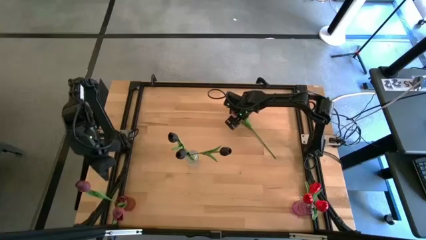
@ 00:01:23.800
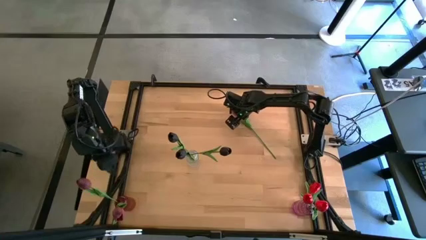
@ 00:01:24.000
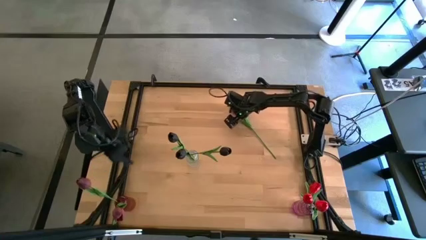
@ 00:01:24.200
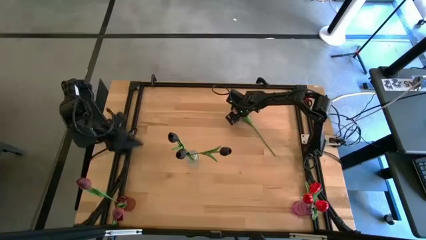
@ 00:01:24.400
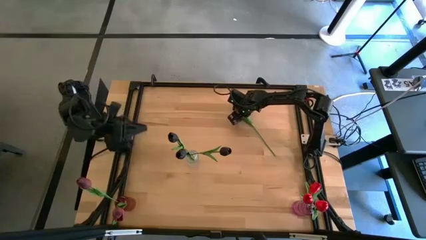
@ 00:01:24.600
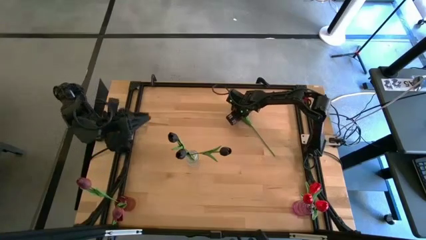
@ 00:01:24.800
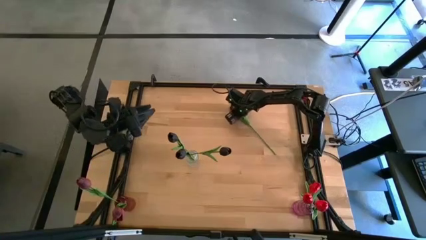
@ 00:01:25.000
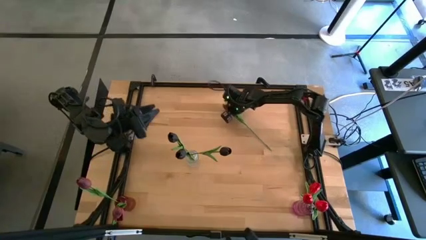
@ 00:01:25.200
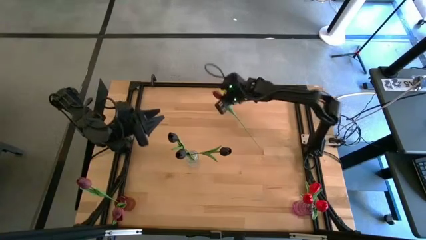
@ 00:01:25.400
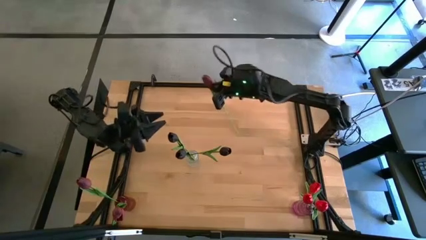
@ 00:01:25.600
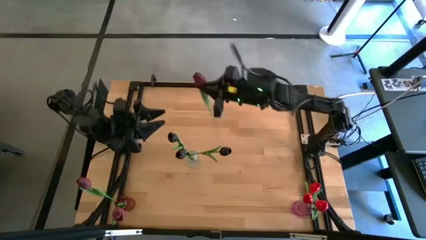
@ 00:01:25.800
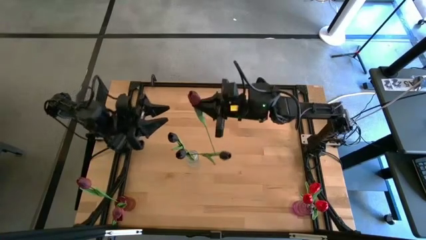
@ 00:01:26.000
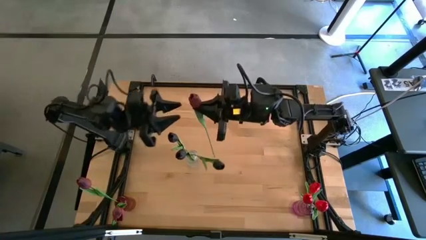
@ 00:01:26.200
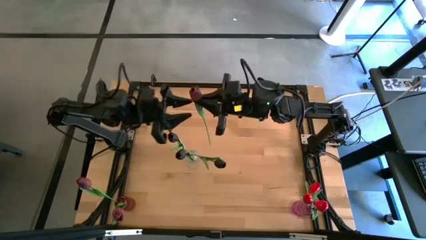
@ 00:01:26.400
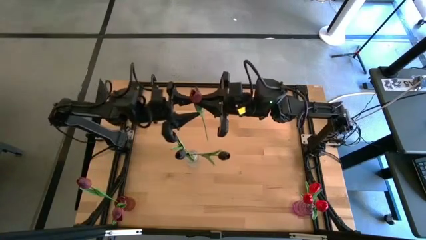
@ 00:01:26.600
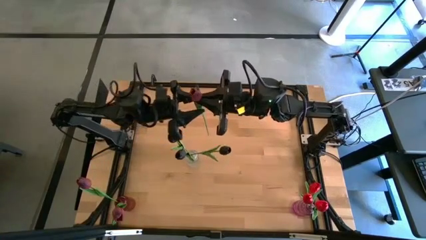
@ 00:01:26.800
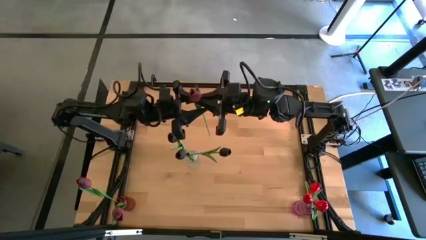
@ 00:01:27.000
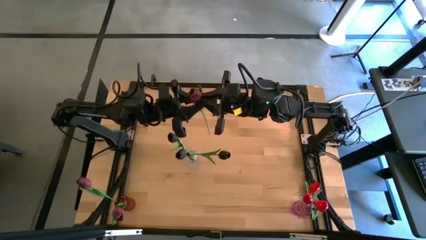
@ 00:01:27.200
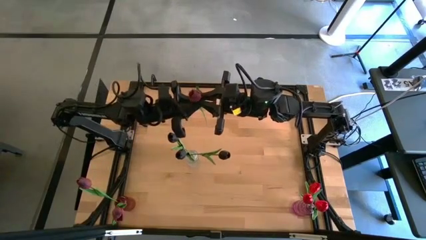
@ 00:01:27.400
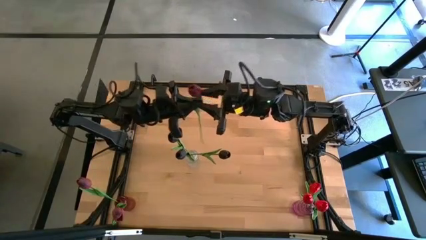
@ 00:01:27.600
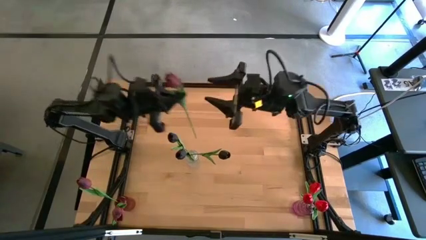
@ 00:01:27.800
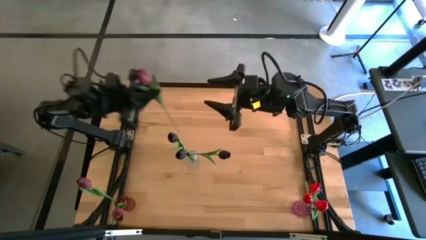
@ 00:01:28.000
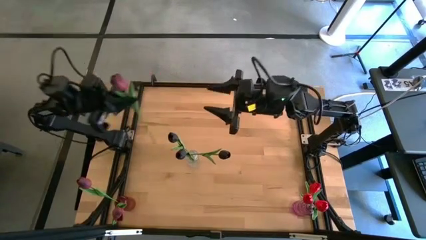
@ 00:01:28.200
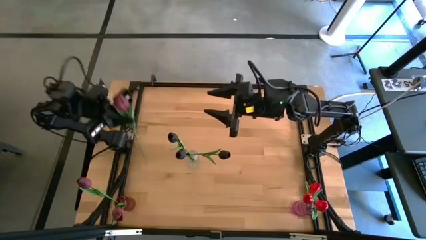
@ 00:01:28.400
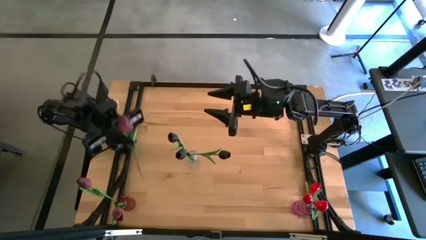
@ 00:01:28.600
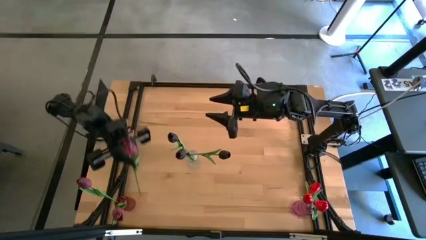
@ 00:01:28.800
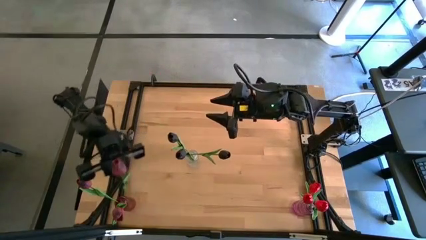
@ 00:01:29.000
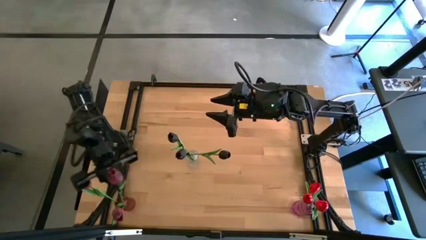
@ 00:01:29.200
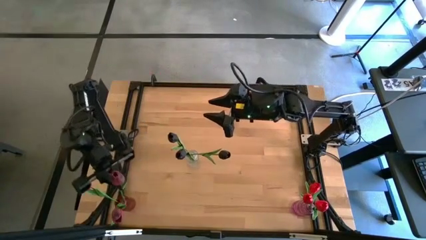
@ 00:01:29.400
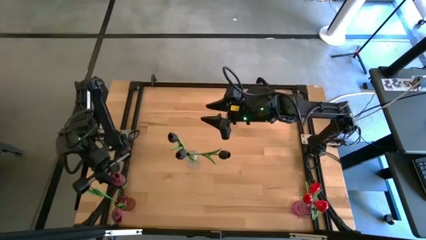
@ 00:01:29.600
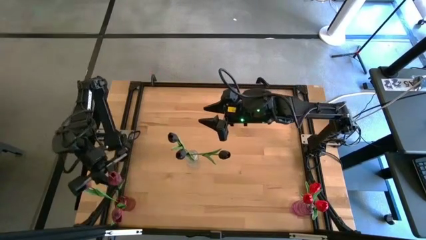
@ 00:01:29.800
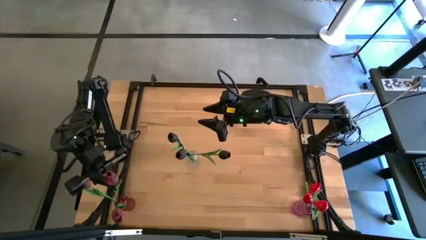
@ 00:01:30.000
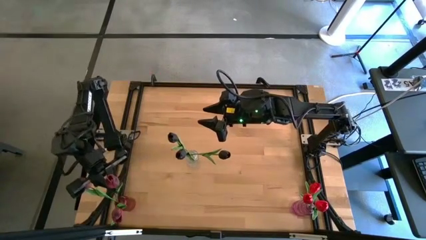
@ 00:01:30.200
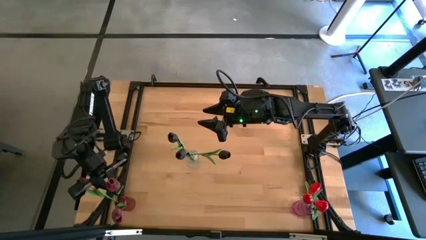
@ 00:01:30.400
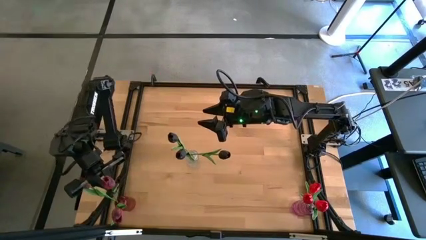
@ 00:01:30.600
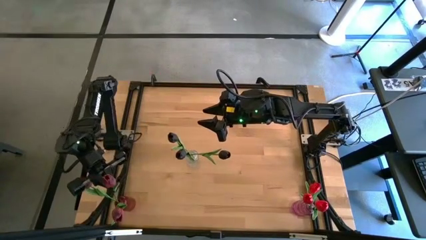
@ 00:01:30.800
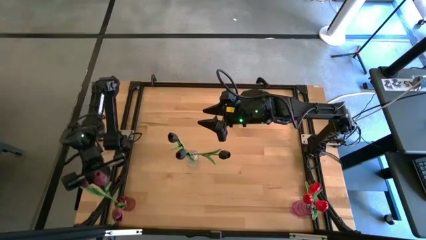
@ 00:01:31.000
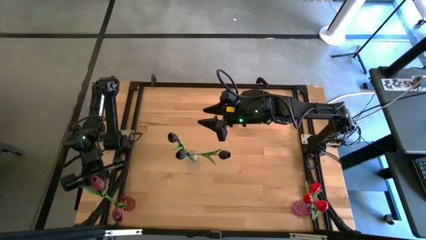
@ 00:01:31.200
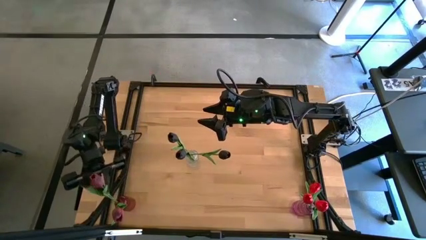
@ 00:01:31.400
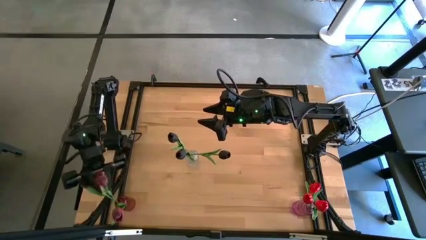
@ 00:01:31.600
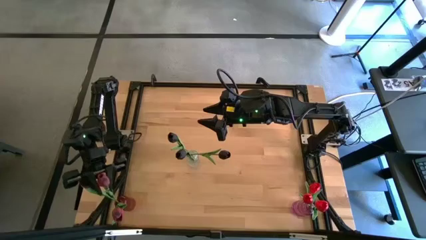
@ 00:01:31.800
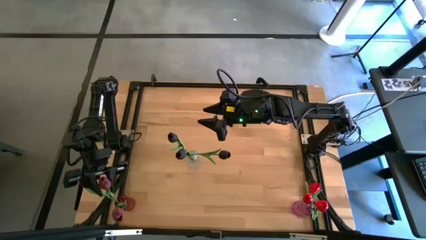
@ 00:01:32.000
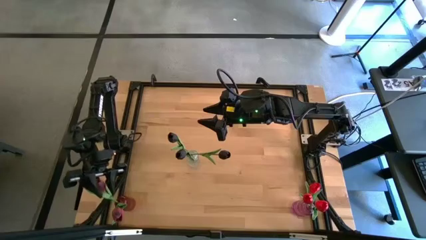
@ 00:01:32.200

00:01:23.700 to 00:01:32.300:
Task: Sort flowers into vase by color
Put the pink flower into the red transparent vase

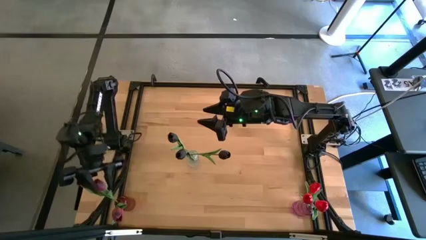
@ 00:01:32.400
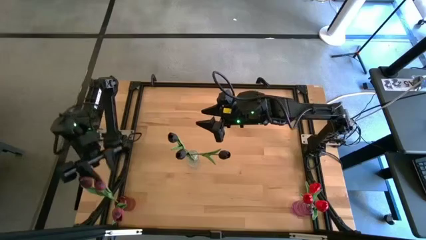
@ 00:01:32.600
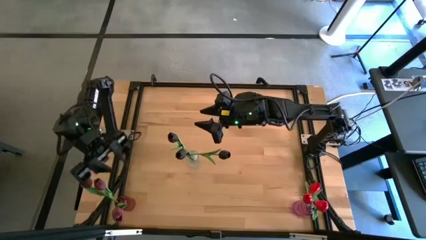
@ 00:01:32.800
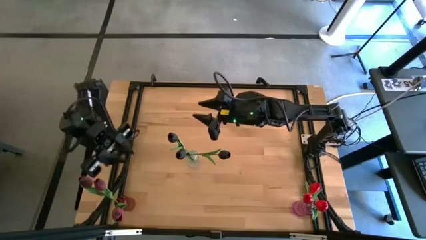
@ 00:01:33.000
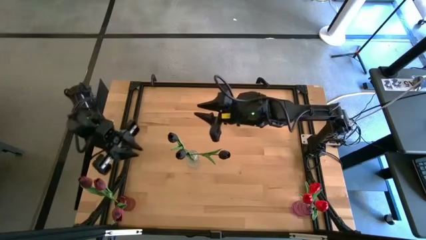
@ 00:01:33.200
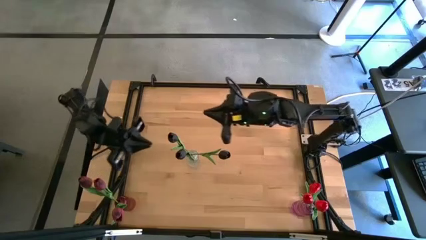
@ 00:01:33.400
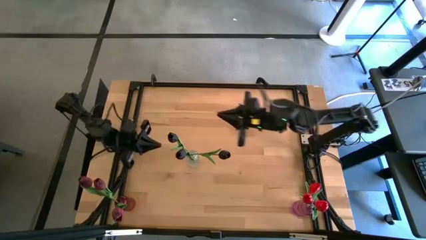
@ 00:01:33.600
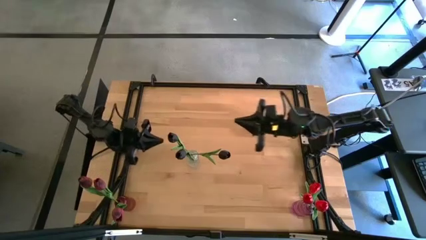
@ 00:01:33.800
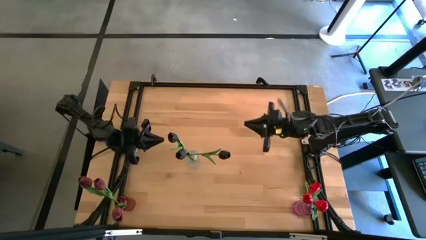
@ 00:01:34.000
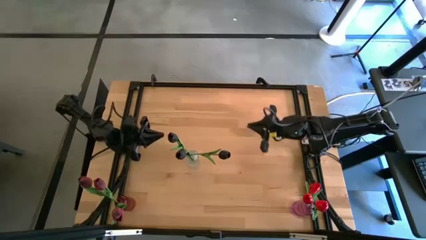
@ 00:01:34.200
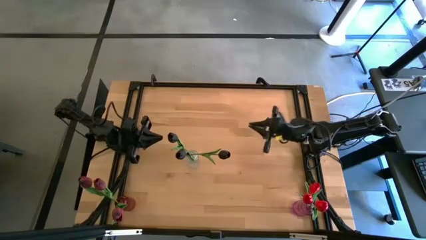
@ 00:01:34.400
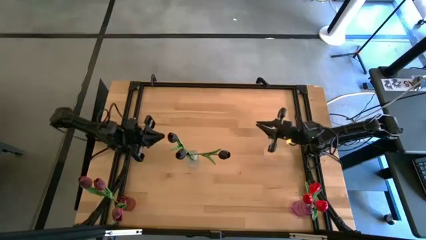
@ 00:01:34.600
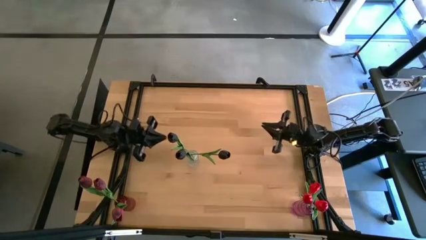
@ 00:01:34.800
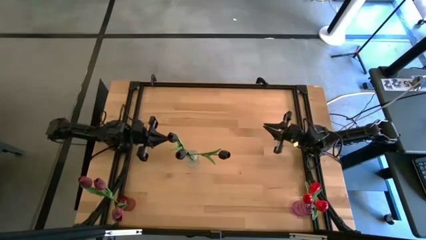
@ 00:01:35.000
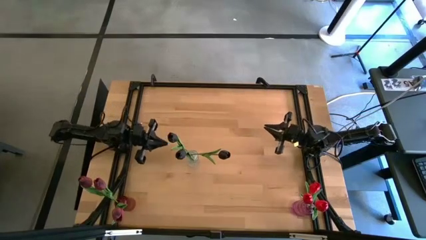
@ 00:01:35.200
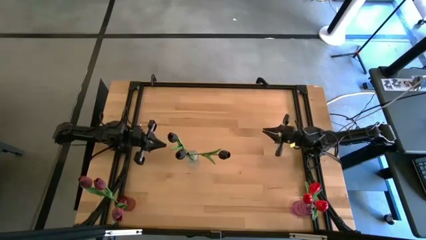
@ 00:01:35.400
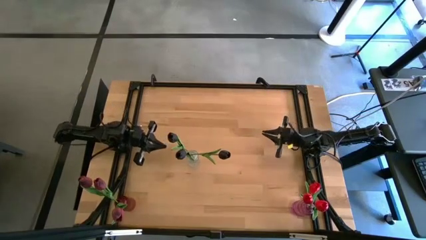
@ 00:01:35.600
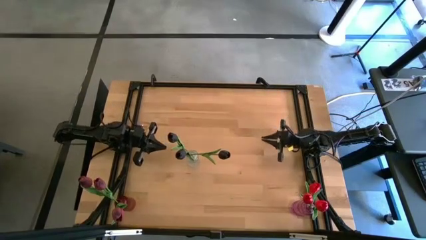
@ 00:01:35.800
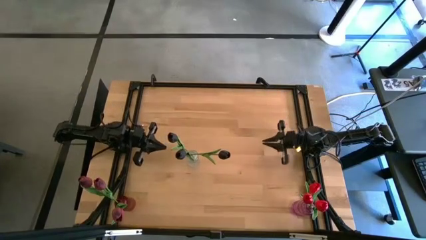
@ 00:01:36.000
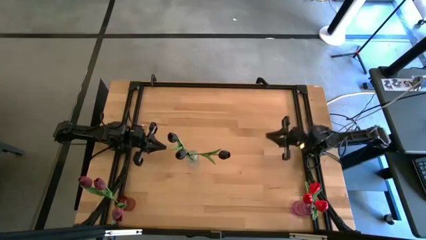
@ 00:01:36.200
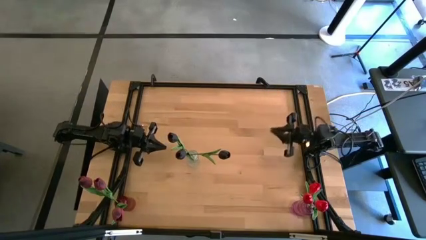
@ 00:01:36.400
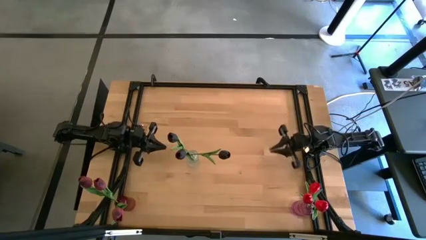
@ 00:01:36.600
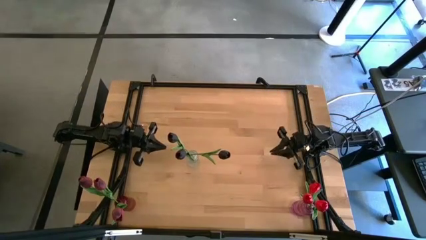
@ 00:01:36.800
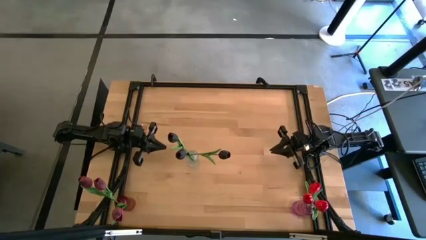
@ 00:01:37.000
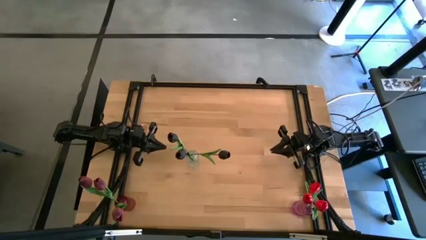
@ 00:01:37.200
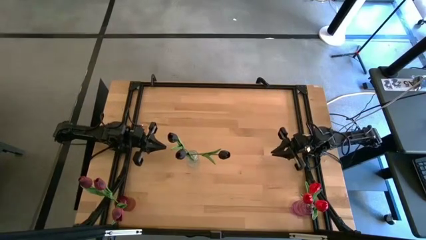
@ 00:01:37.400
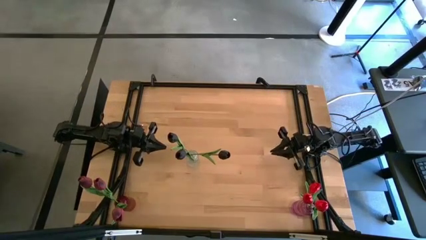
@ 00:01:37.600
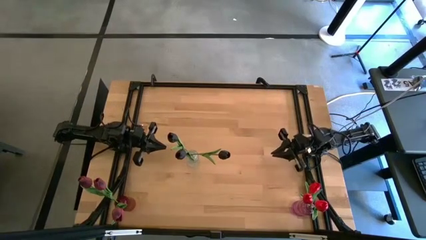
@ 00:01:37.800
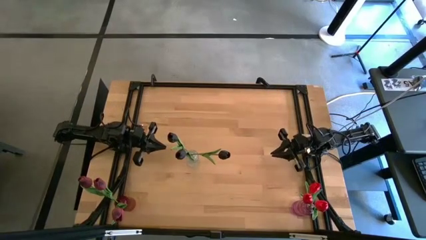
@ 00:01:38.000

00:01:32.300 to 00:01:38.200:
Return to home position
